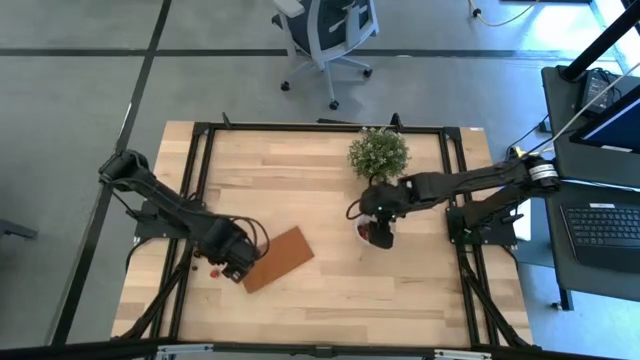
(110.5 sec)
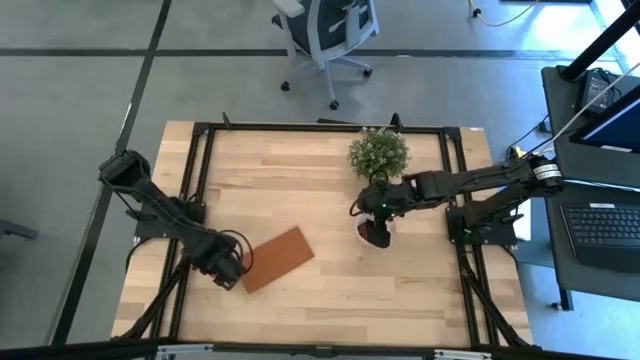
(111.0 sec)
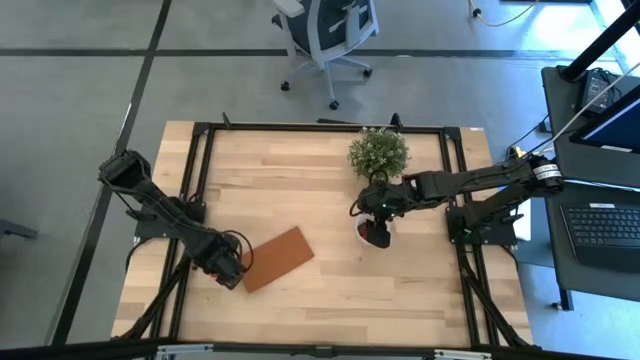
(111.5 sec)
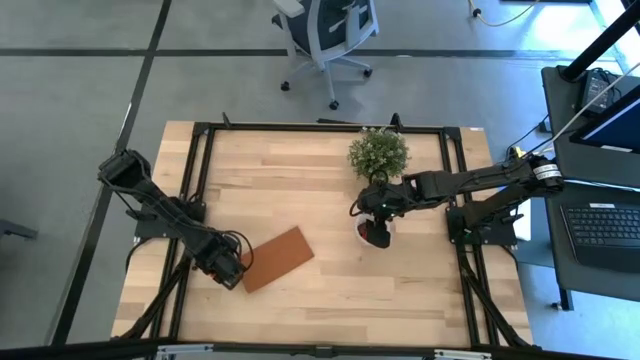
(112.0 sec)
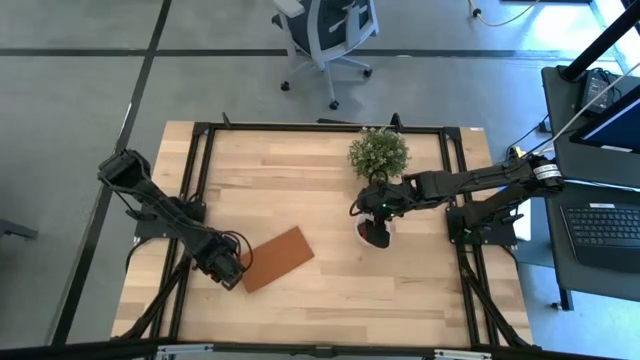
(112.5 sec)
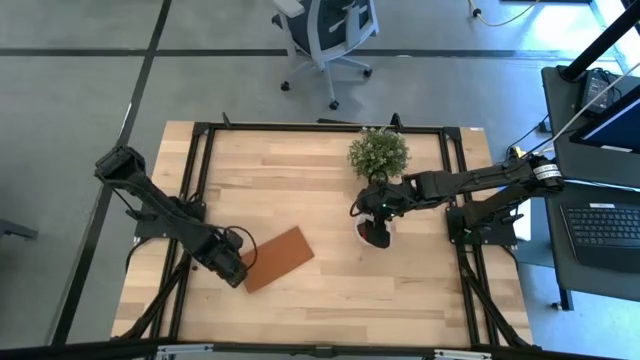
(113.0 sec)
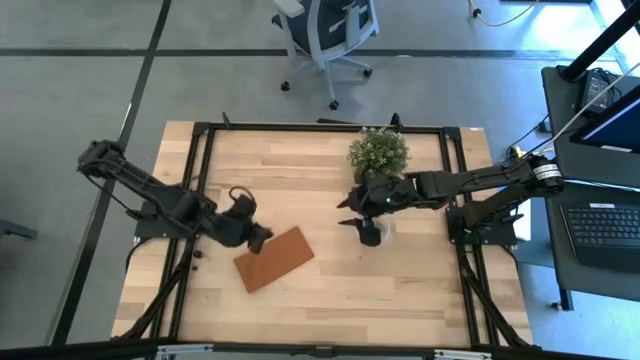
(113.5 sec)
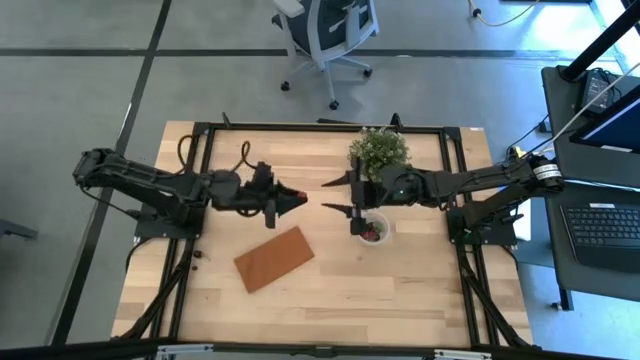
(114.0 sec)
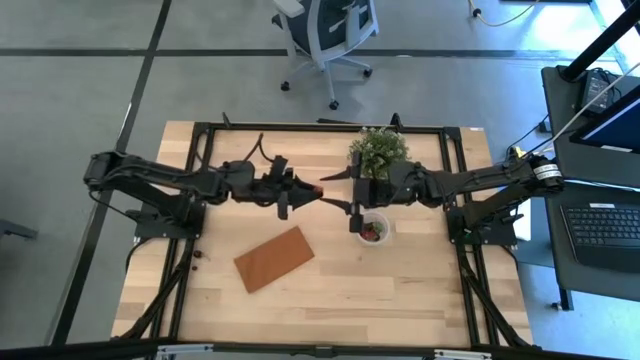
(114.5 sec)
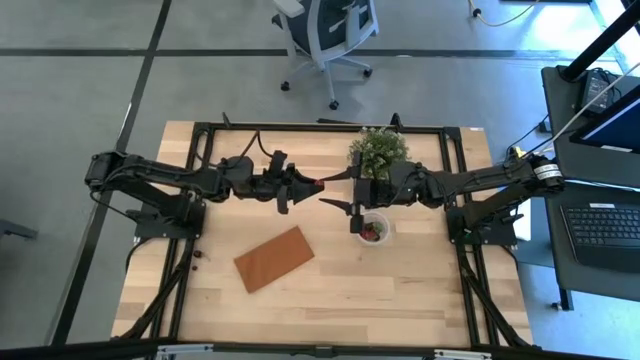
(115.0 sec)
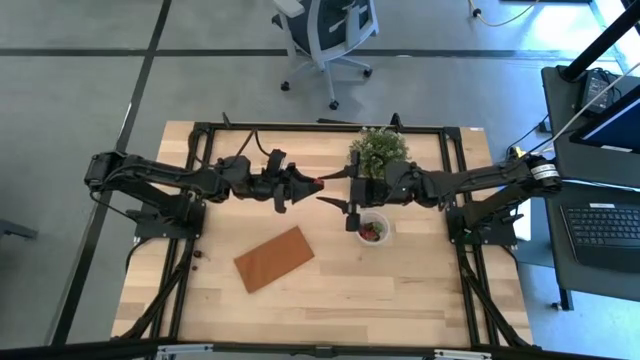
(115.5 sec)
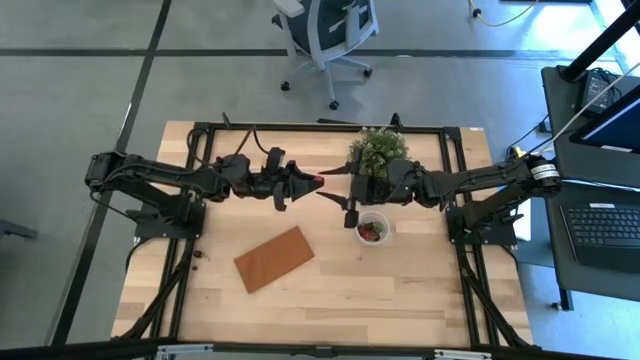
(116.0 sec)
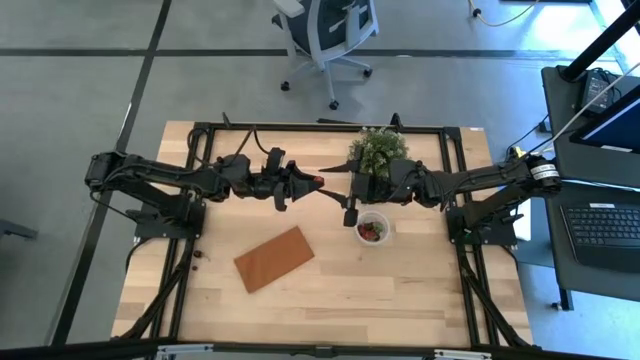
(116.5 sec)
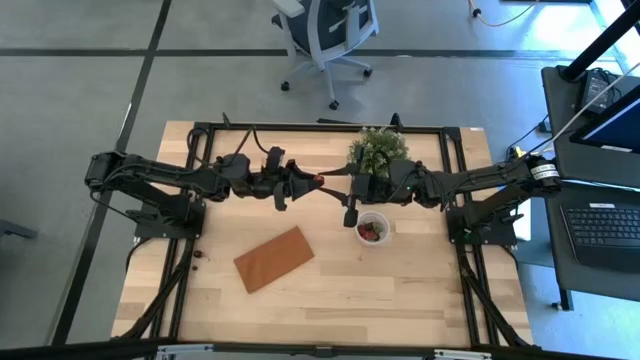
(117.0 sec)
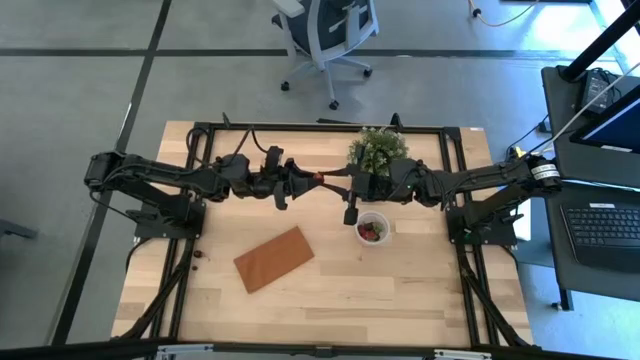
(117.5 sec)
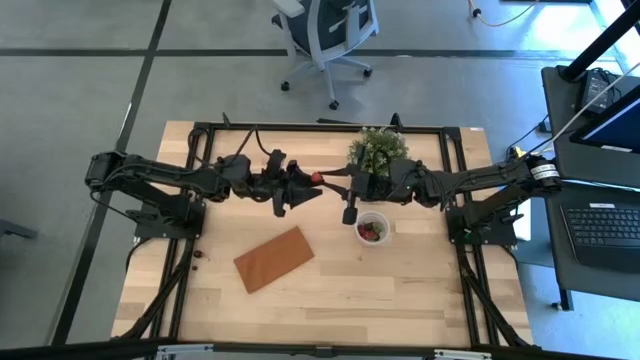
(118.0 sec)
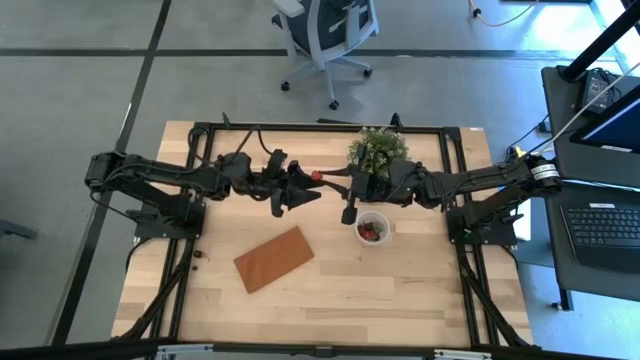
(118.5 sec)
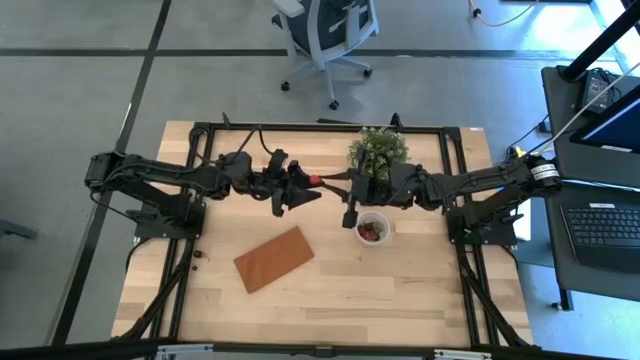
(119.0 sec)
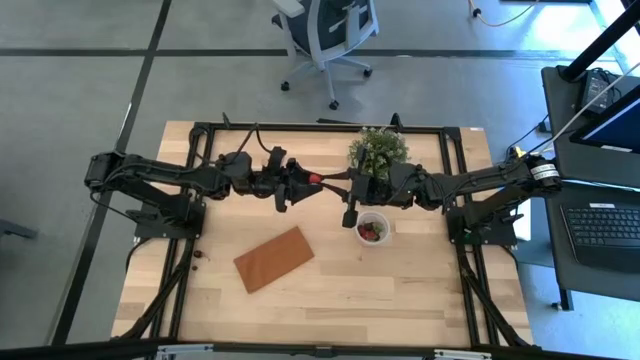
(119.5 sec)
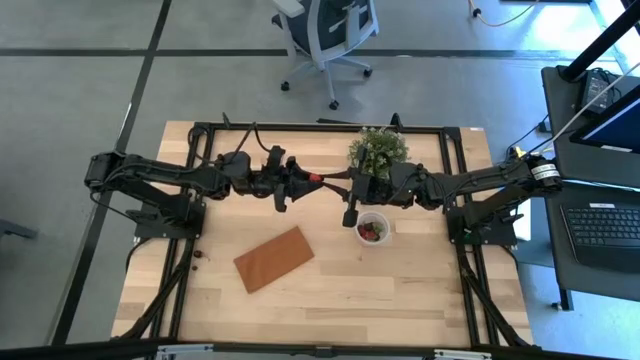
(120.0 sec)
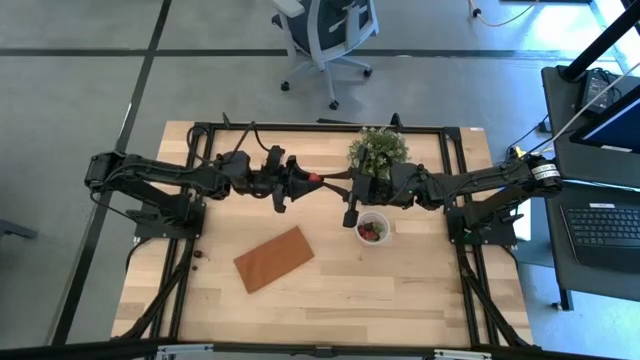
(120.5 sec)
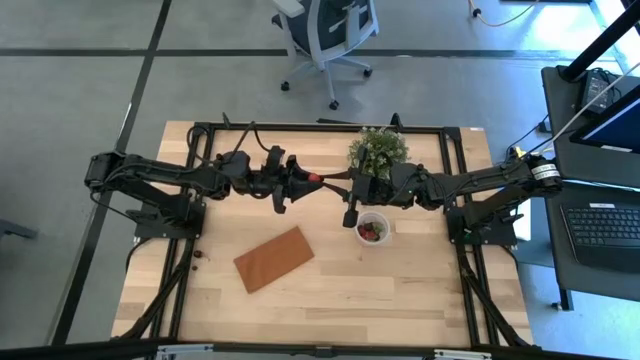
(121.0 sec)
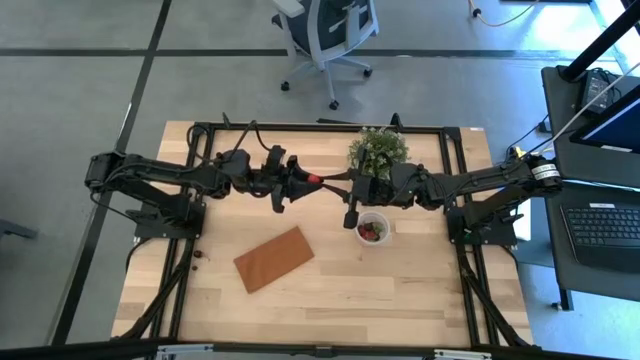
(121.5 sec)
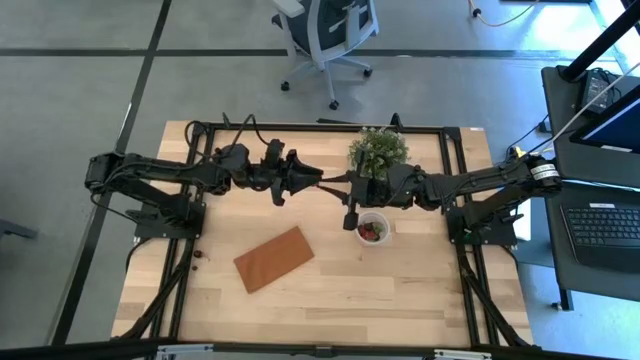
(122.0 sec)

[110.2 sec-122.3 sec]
Task: Pick and placing Produce into tupperware
Put the red raspberry into the transparent container

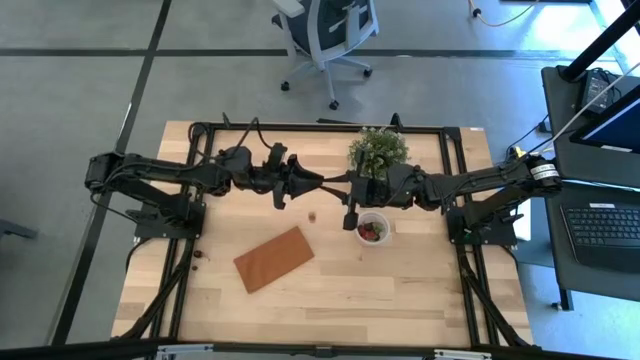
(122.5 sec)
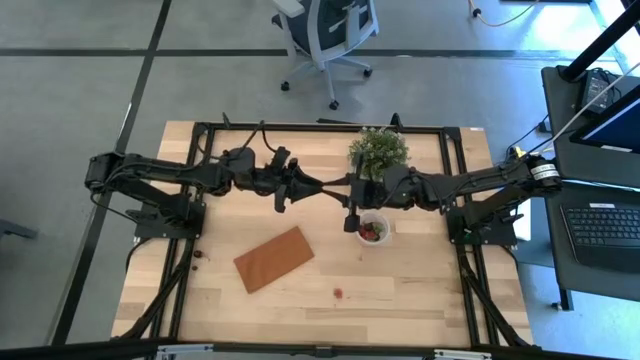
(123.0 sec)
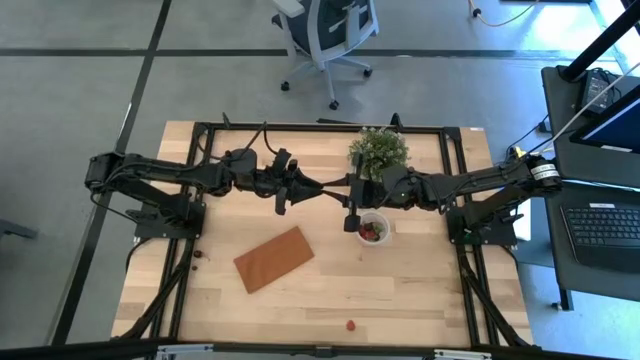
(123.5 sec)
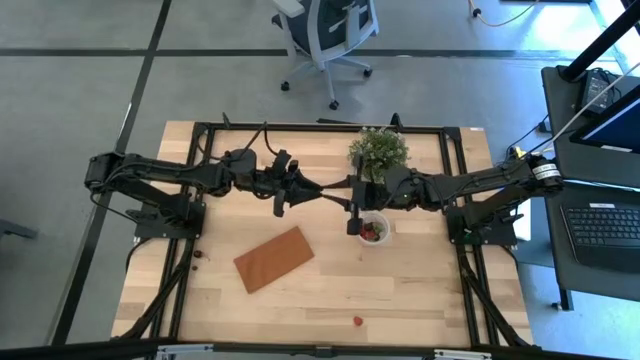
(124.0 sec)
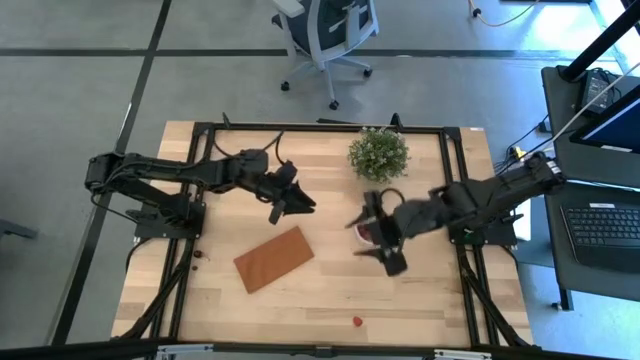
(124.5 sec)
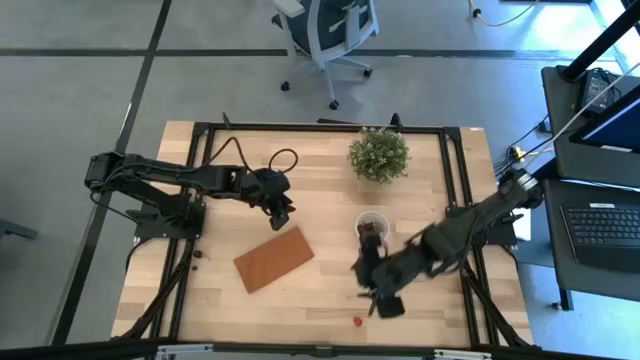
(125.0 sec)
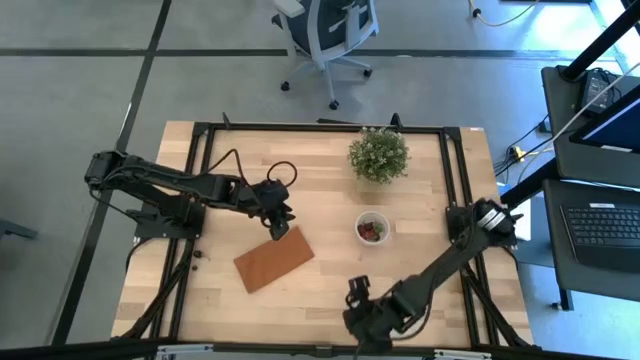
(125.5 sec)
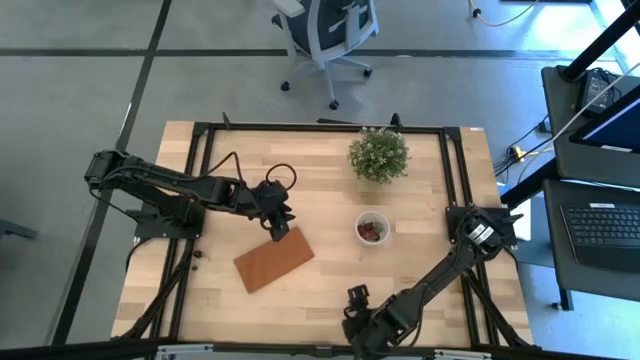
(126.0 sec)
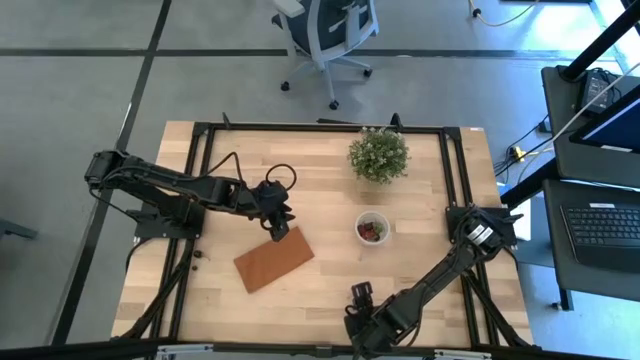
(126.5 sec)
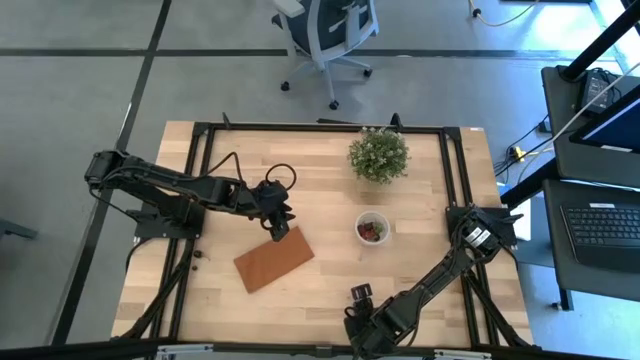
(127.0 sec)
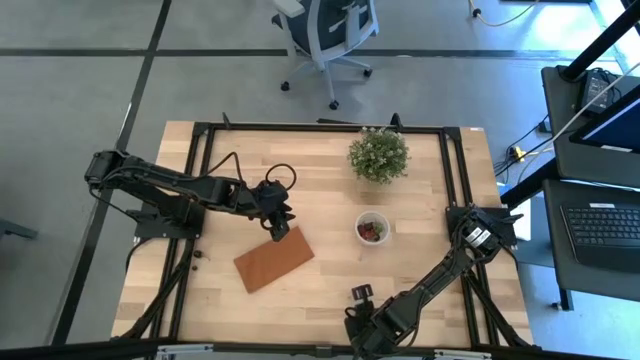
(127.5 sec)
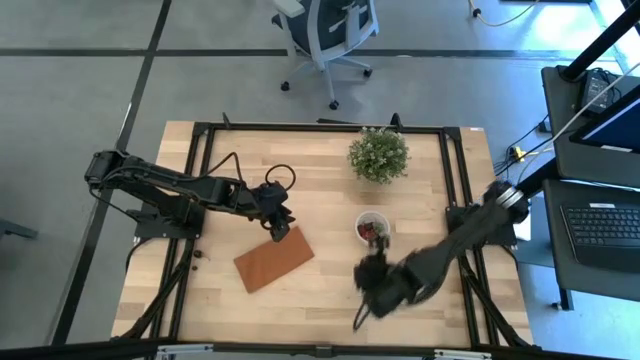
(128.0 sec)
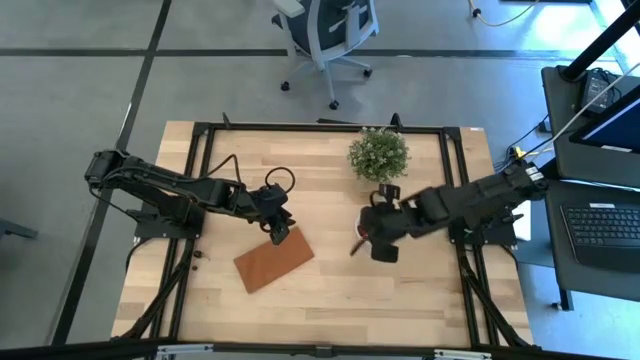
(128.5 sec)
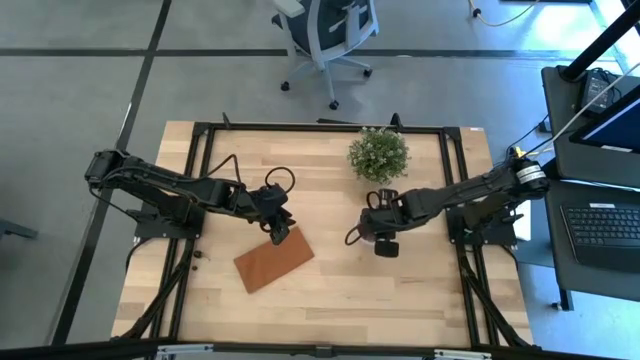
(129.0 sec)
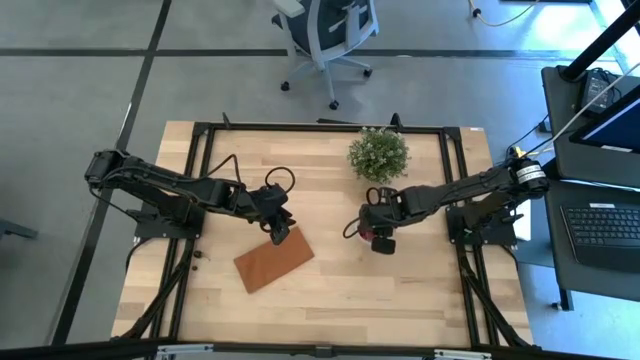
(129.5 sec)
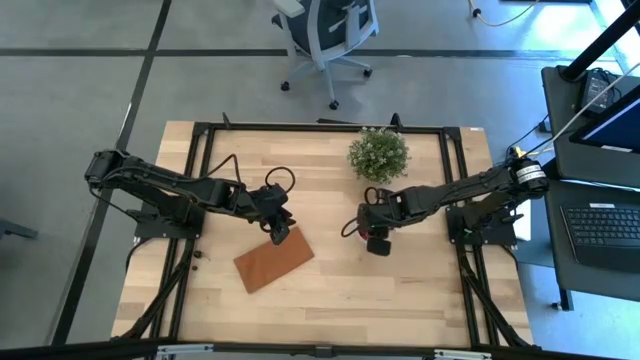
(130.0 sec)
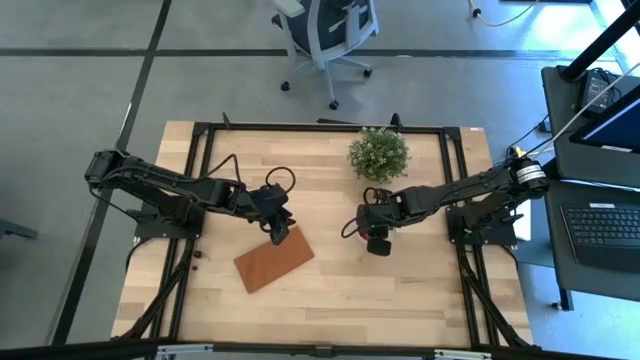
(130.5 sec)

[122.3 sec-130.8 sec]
Put the red raspberry into the transparent container
